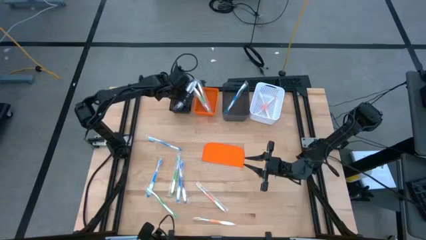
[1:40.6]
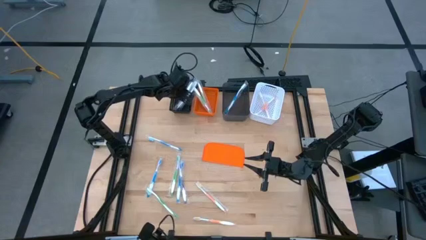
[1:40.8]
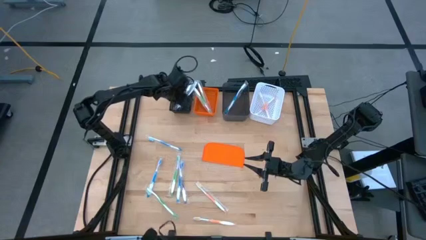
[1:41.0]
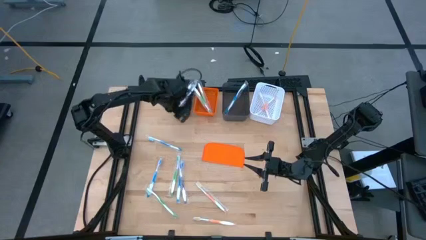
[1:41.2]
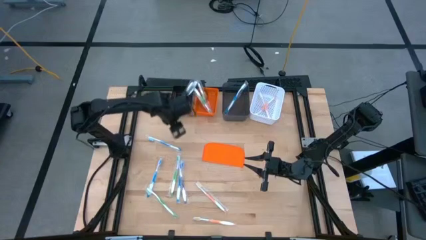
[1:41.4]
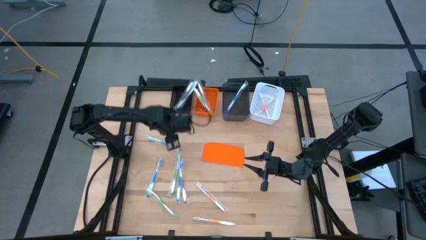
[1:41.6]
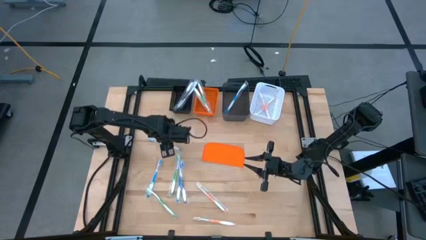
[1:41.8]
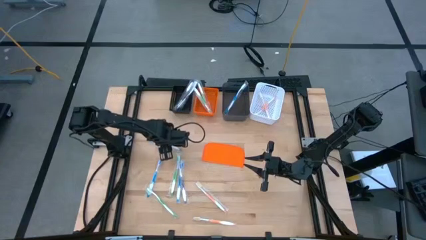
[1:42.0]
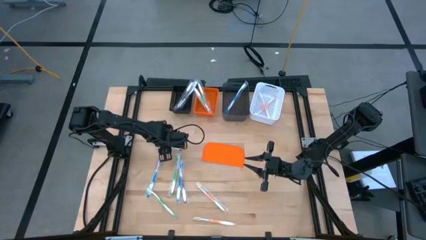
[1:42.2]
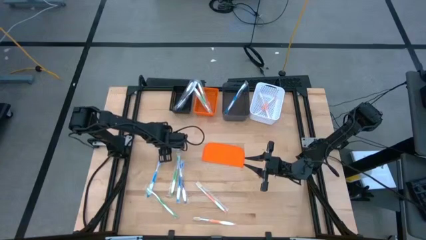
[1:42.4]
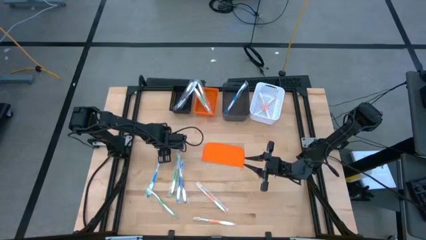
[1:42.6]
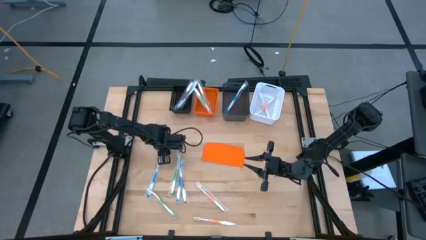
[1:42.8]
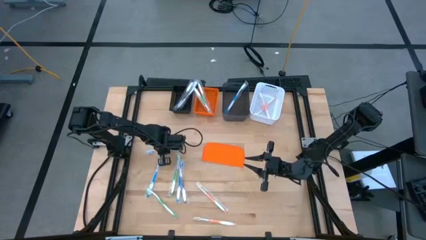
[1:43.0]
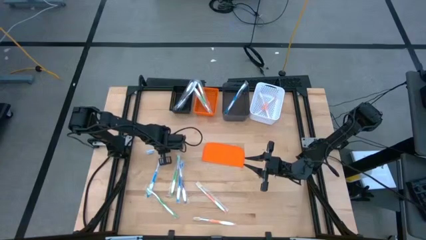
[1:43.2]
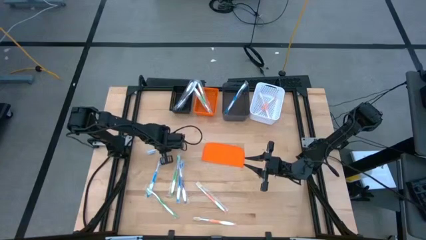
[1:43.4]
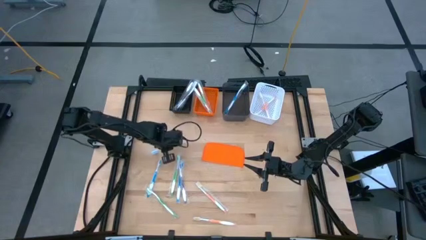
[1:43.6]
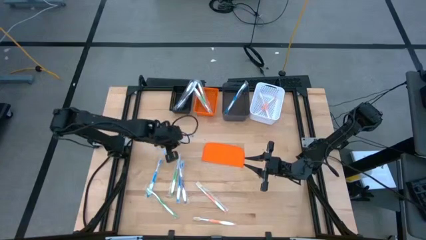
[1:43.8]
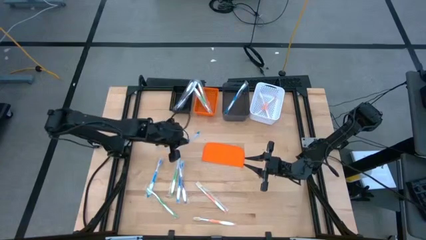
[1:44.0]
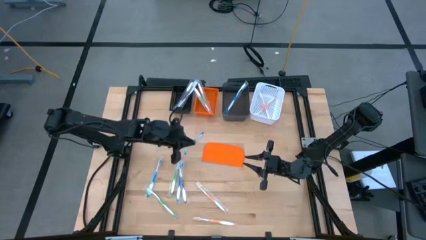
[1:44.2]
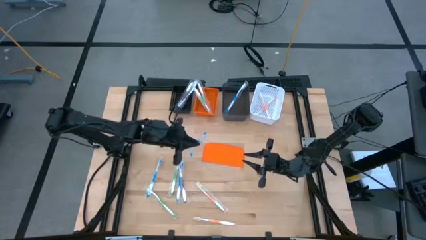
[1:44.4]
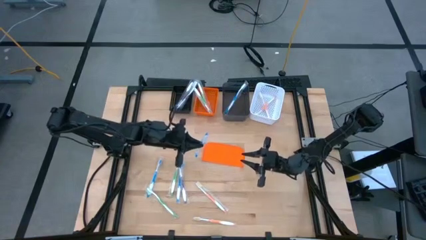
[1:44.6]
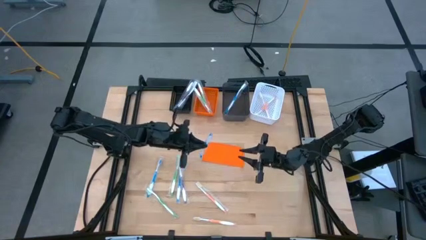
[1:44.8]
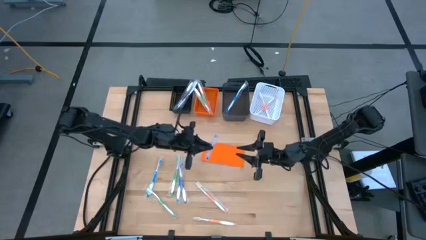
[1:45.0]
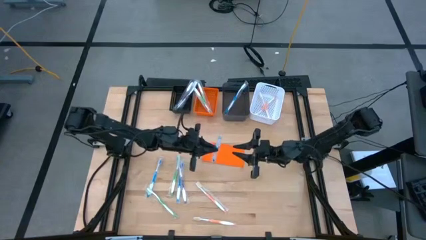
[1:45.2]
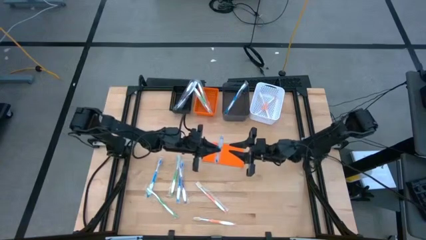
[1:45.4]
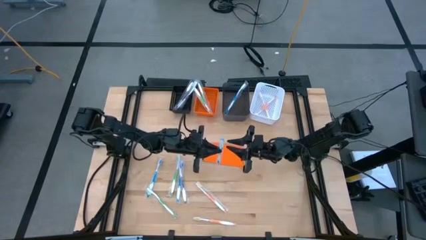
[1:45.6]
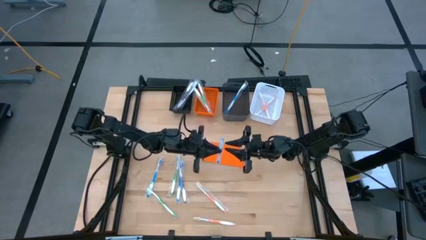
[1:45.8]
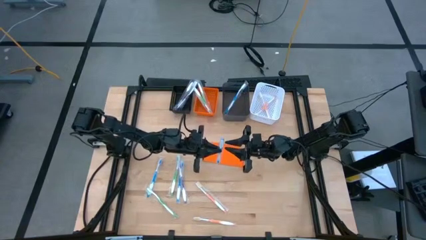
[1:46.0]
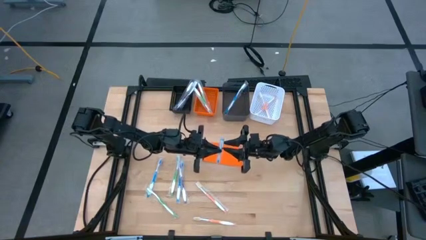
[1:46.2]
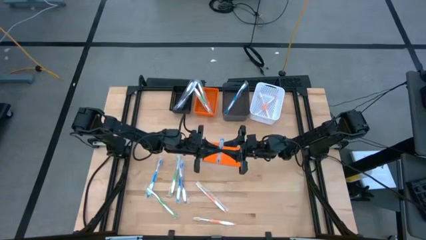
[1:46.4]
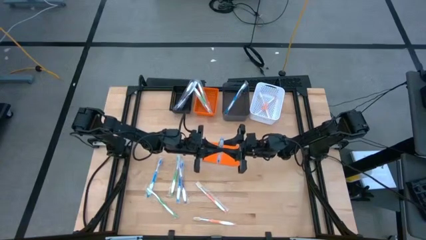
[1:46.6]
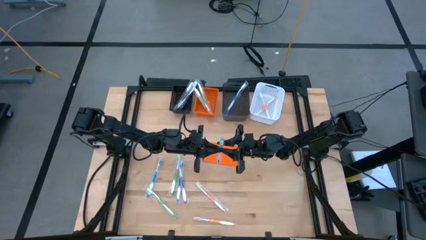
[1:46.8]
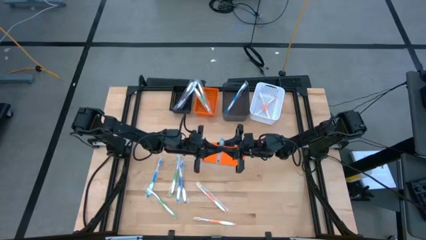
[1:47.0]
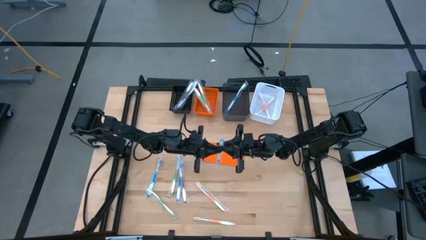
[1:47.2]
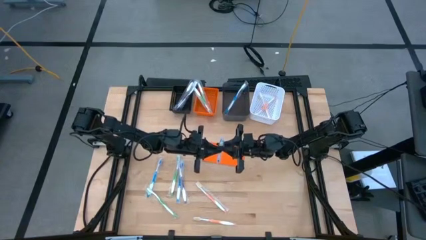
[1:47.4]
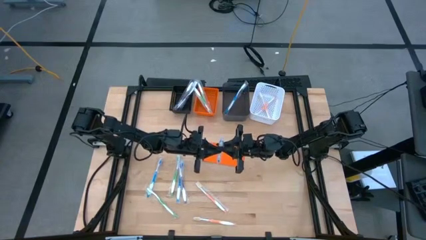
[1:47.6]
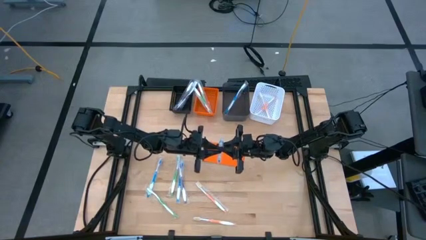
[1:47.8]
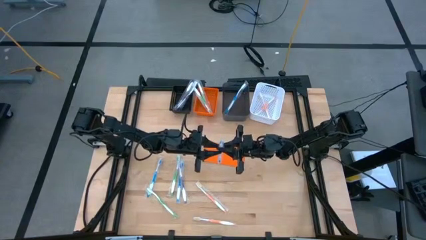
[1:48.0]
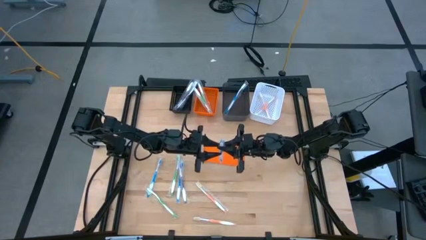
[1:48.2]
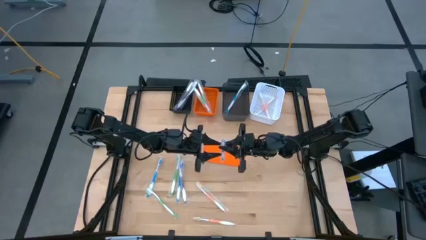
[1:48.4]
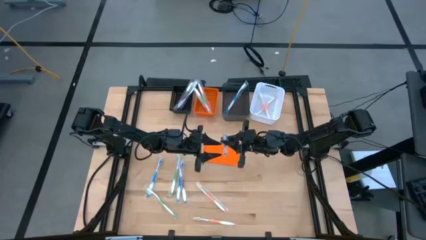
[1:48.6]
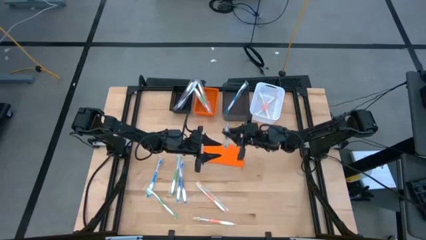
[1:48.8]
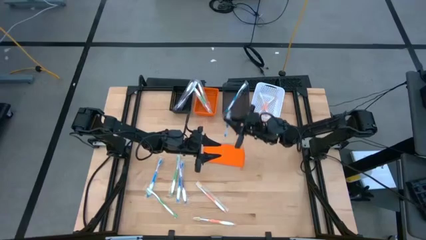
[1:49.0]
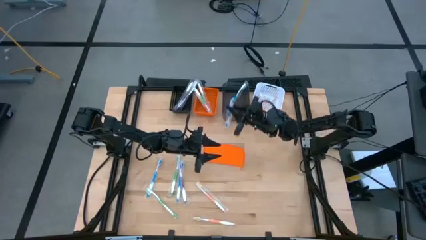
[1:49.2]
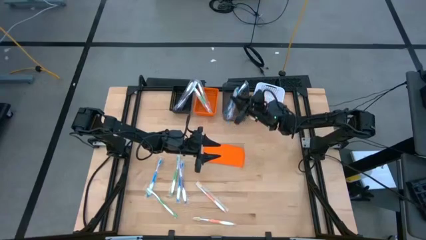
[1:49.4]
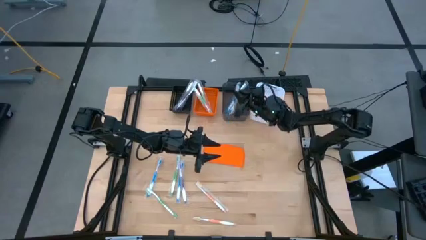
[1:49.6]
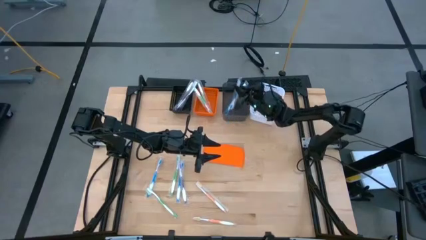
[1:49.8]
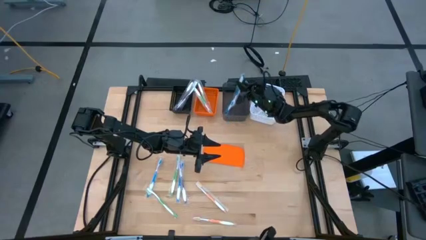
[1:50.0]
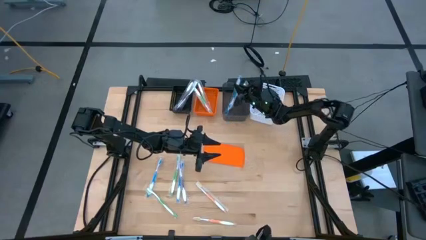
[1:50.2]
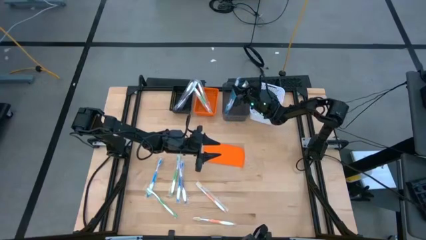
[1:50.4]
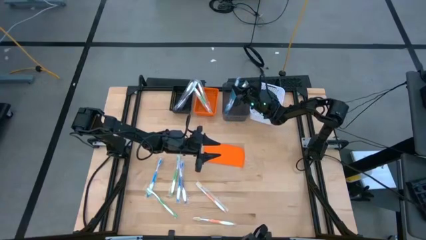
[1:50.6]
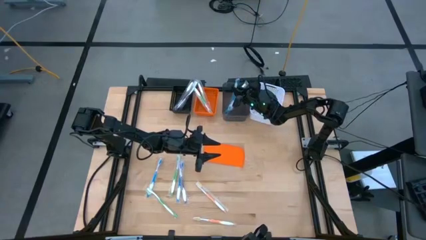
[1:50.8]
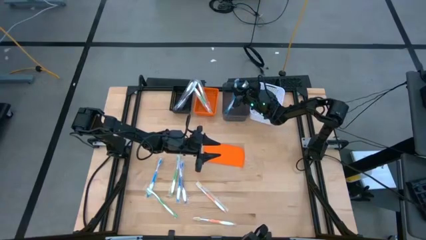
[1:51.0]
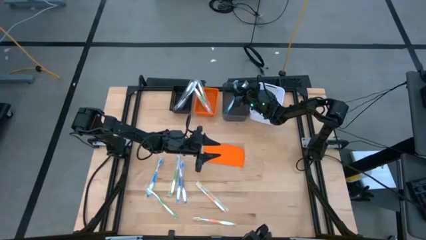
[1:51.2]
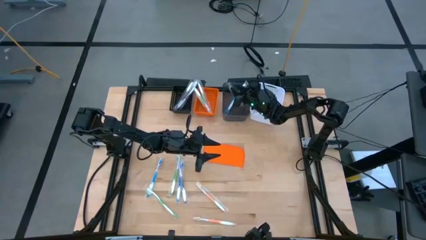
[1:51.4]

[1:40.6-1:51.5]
Task: Pick & Place Toothbrushes
Put the blue toothbrush into the black transparent bin

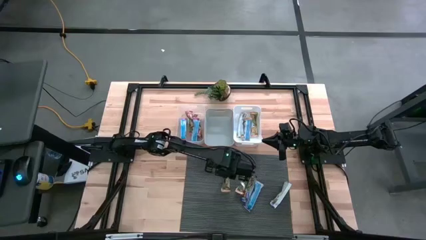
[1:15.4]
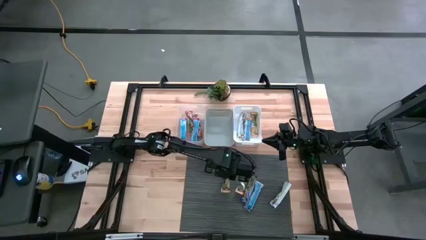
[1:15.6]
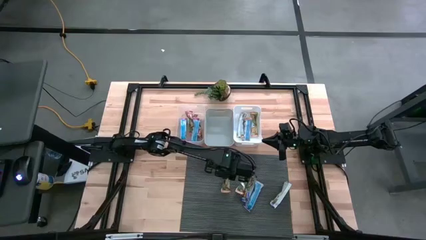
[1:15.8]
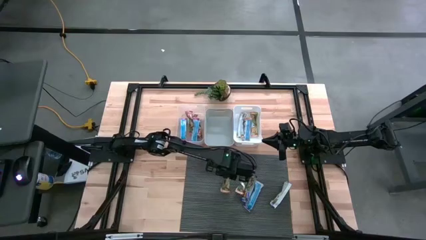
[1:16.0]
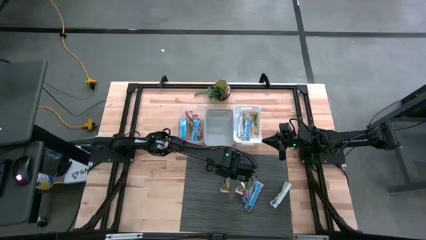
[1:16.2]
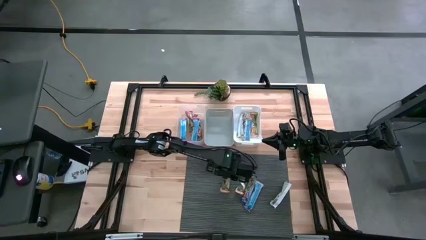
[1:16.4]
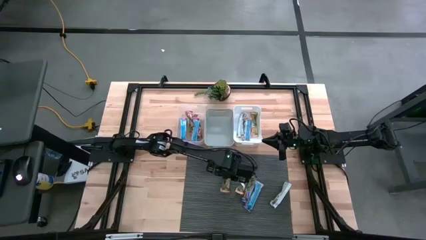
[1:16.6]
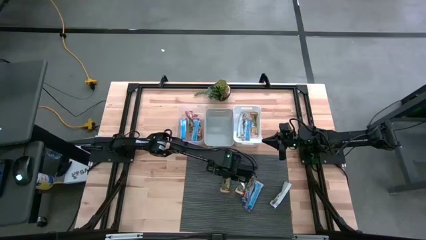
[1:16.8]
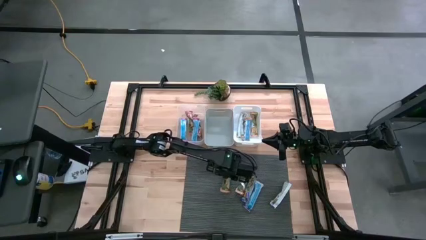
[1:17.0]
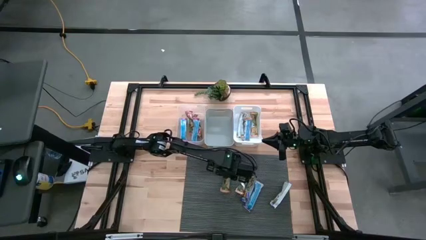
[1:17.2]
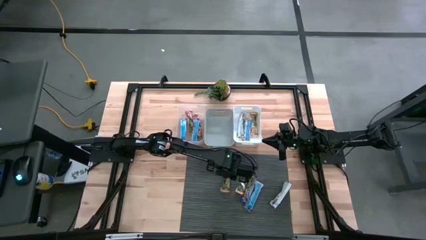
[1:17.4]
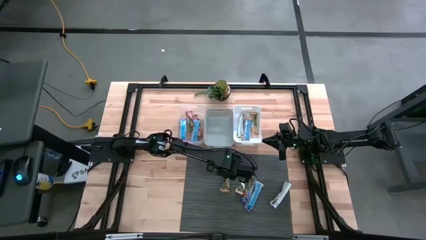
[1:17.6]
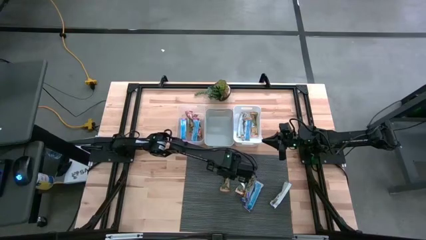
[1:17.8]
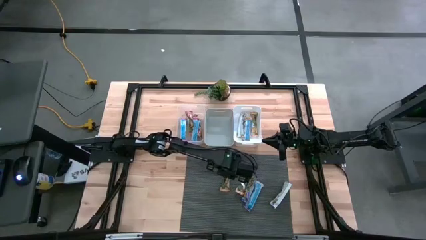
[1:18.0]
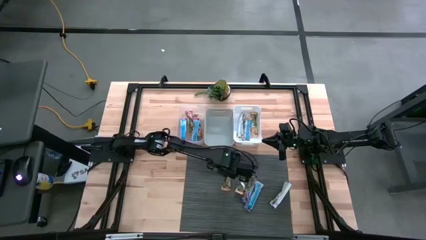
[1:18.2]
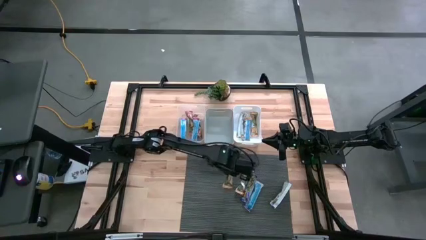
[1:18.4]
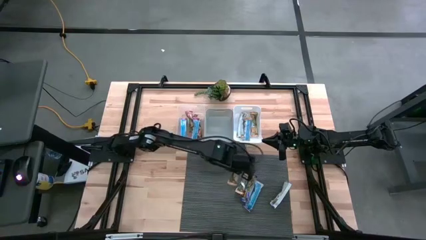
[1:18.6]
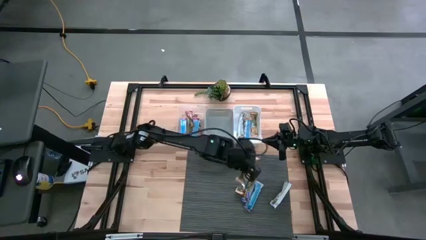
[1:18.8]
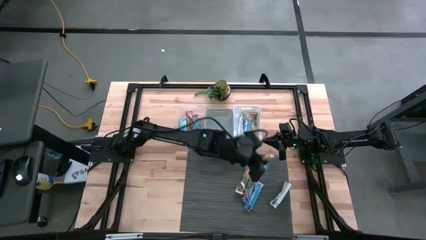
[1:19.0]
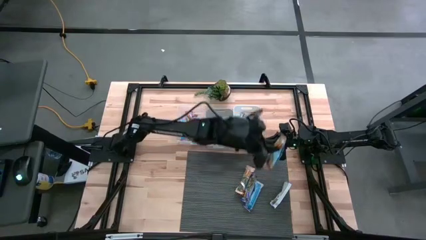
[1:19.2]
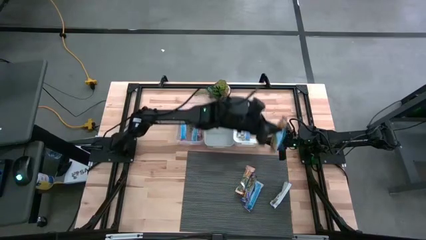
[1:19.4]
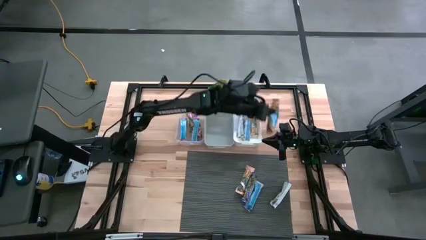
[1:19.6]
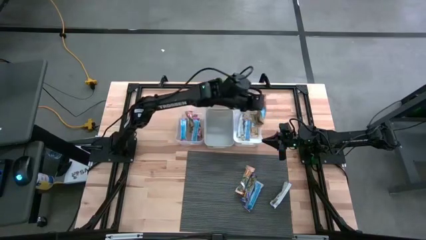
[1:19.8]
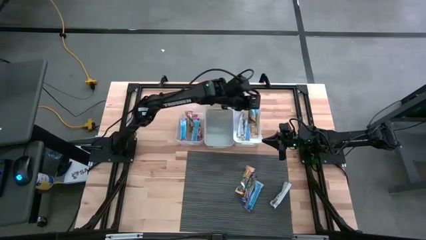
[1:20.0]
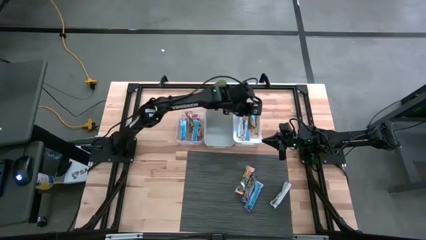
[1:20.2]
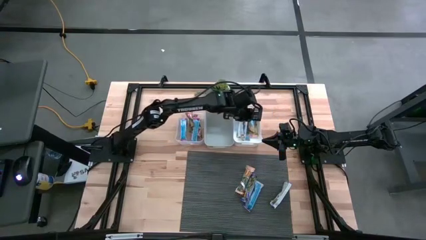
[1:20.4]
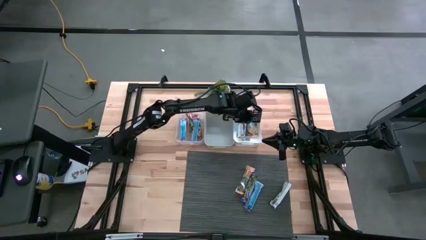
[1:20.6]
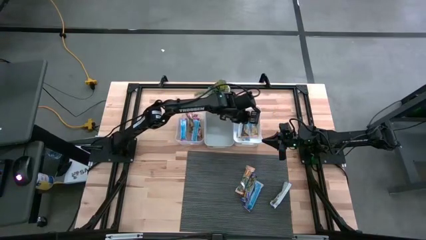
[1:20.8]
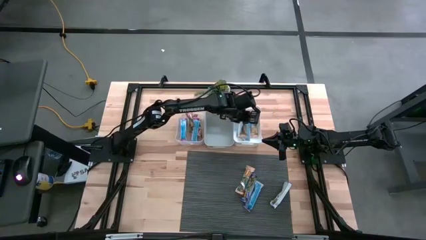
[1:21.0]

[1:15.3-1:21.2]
Task: Pick and place Granola Bars by type
Put the yellow granola bar into the white bin
